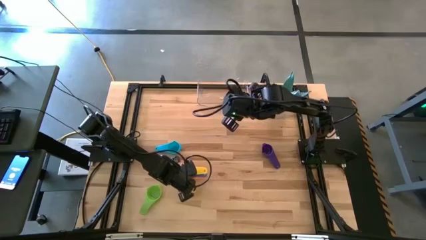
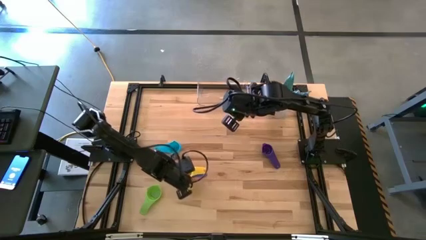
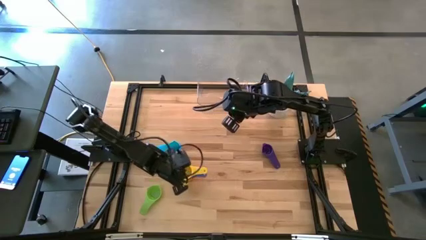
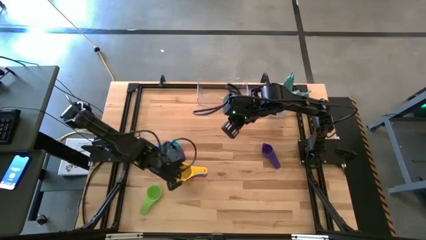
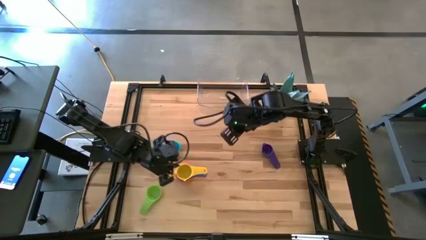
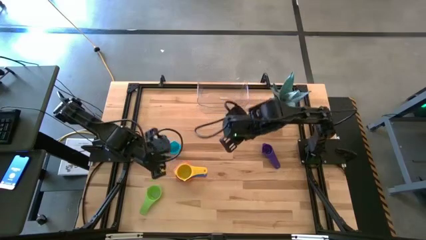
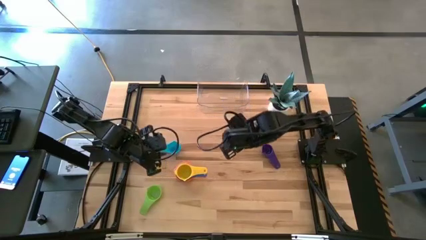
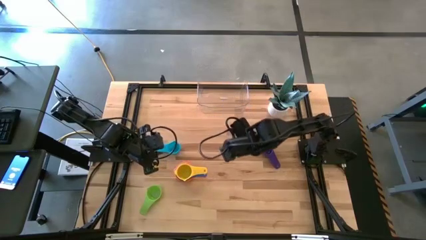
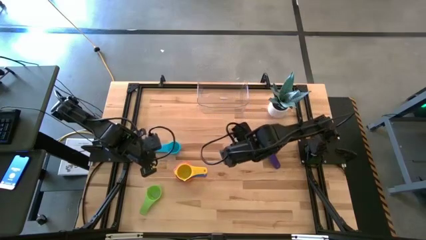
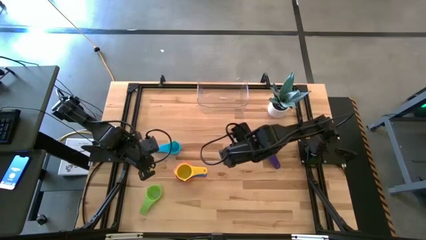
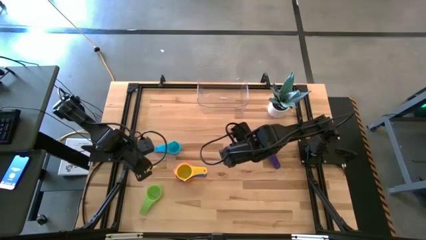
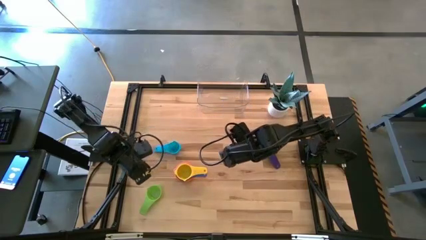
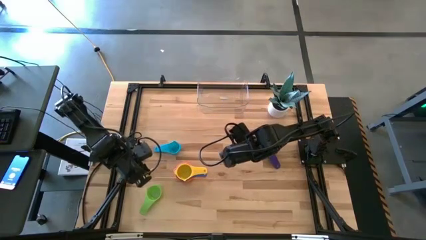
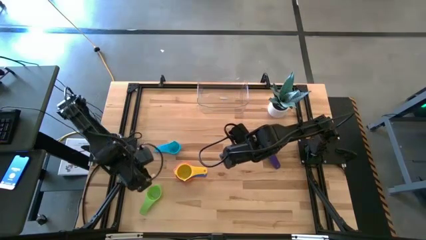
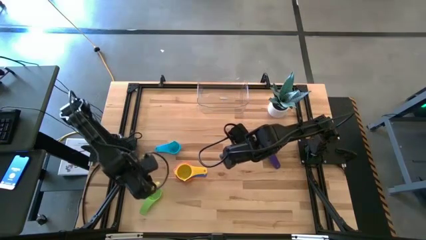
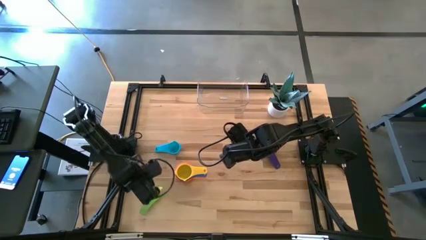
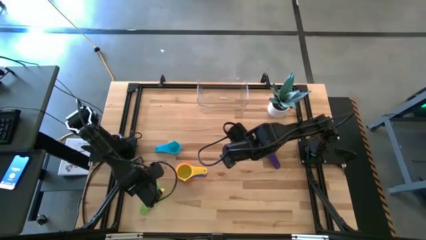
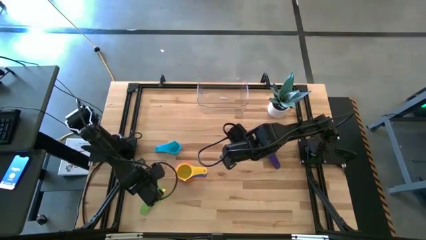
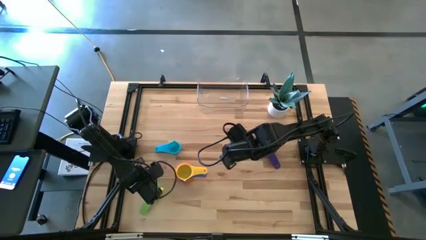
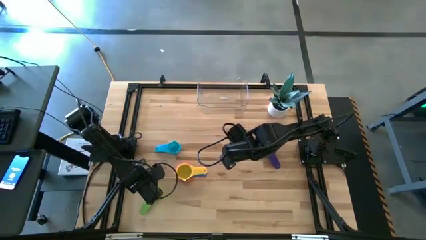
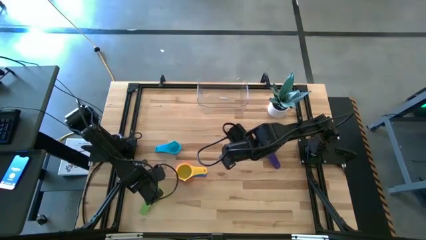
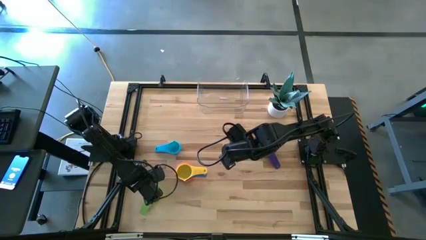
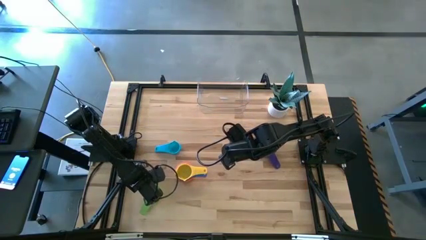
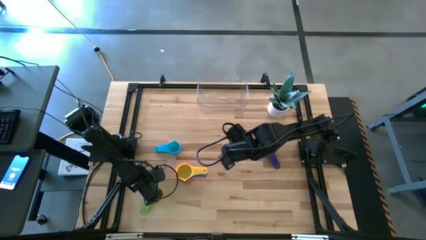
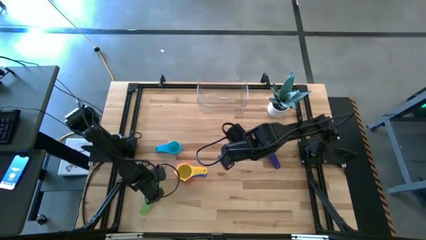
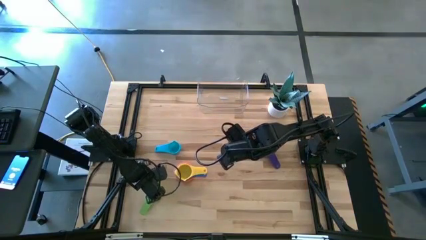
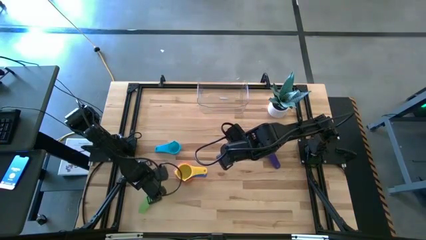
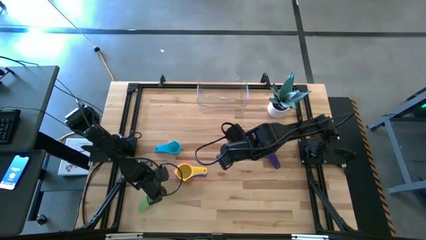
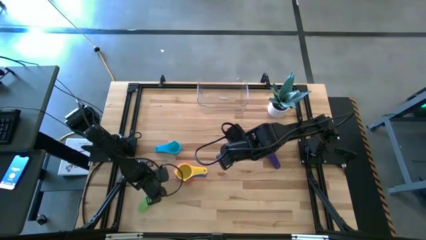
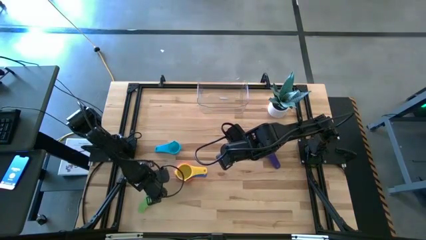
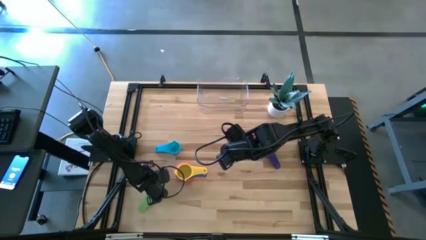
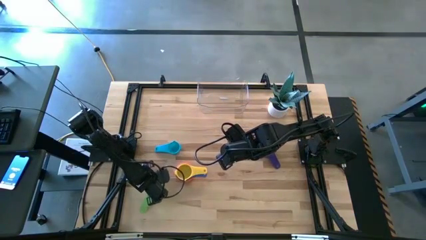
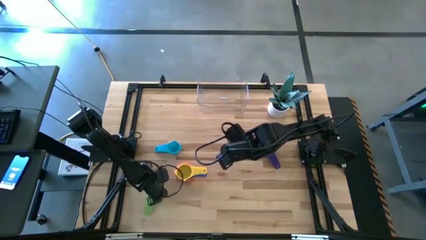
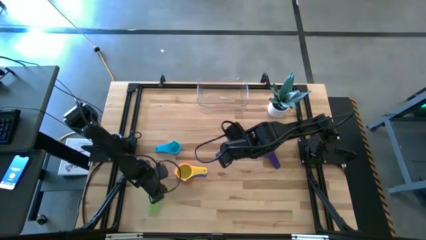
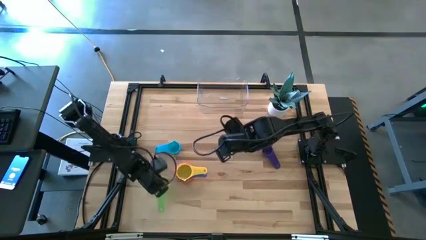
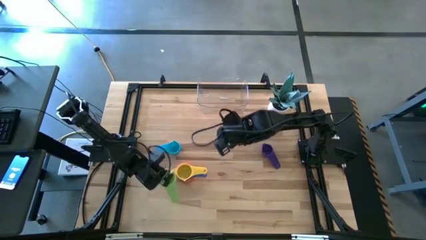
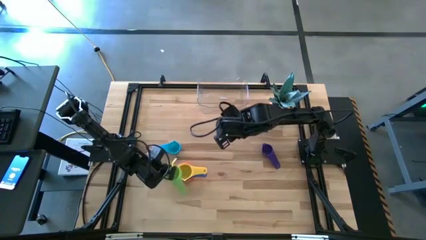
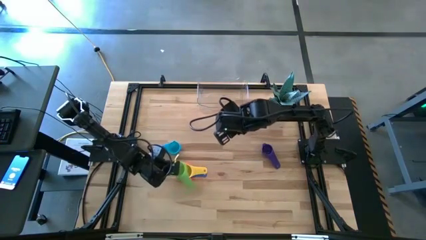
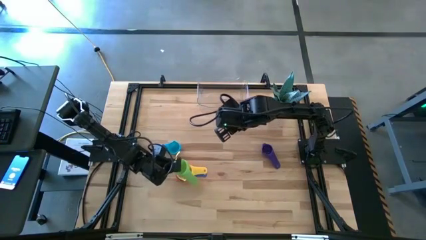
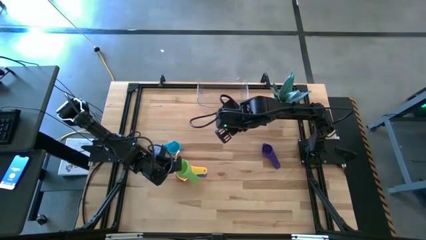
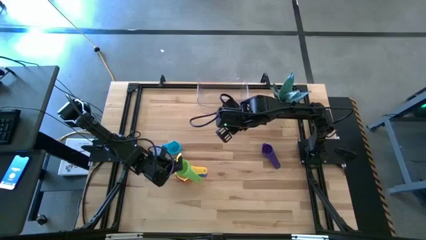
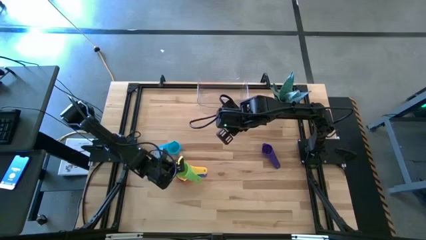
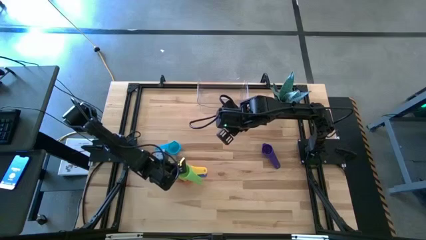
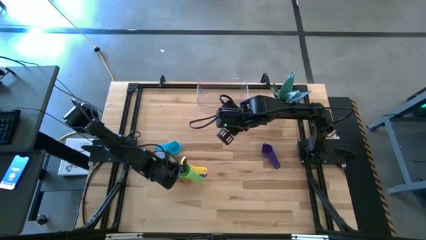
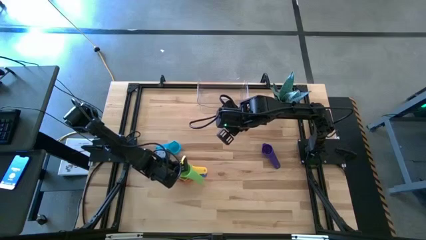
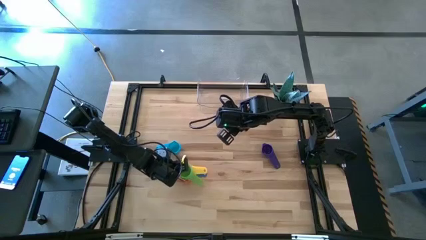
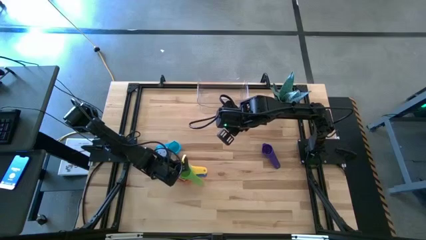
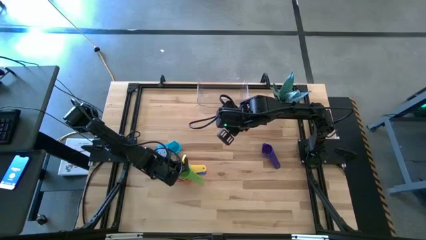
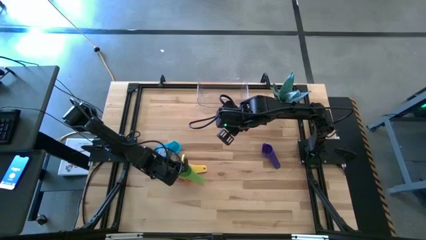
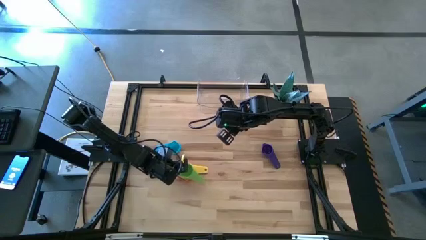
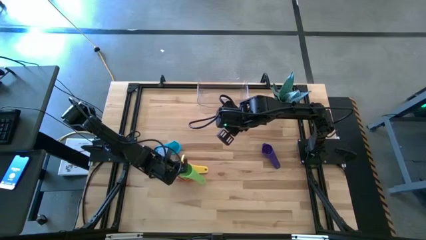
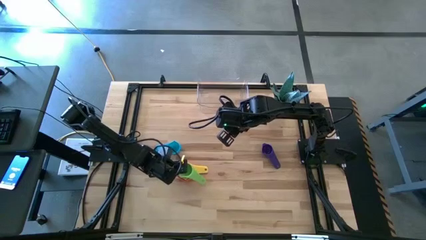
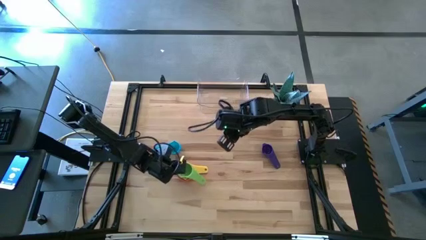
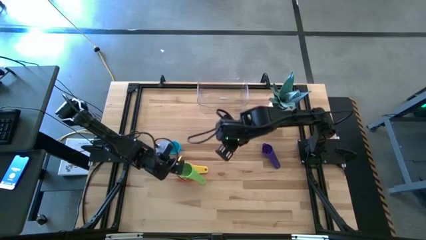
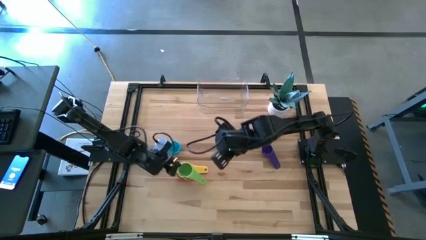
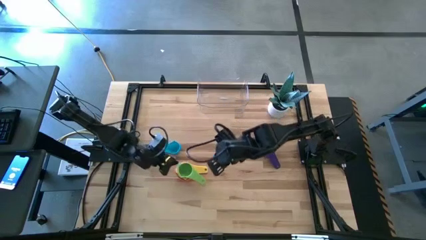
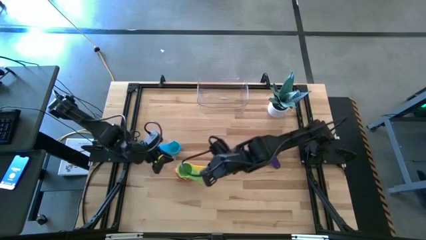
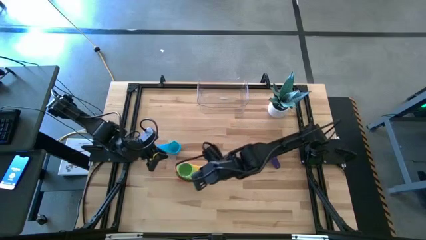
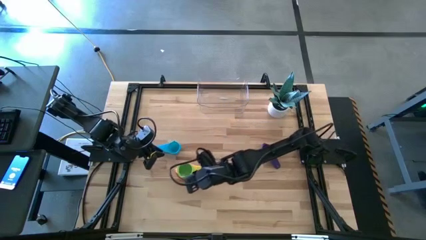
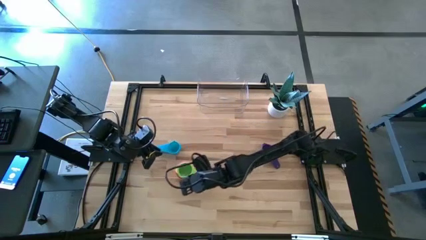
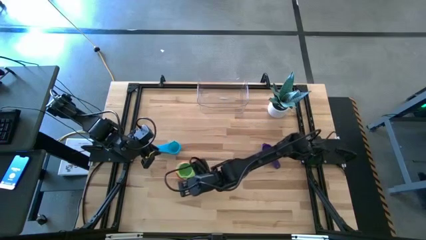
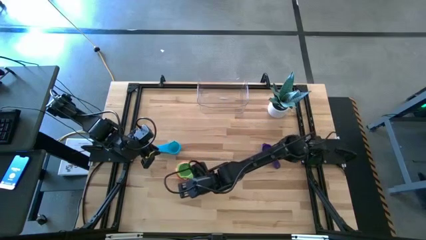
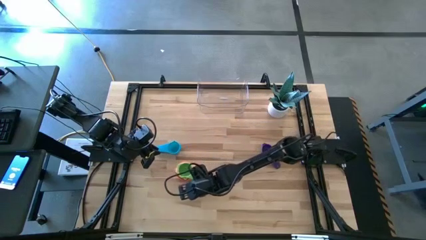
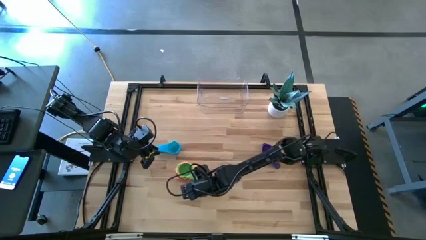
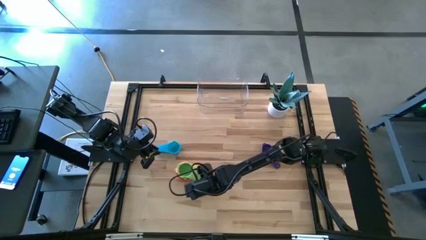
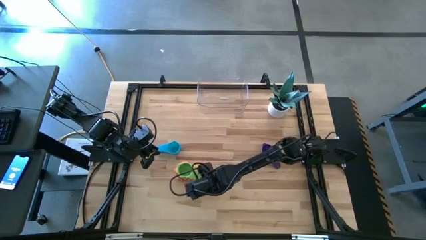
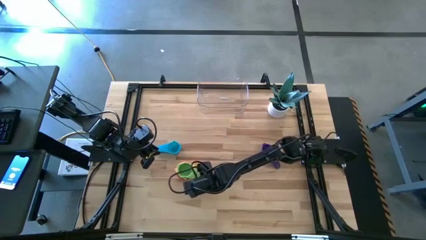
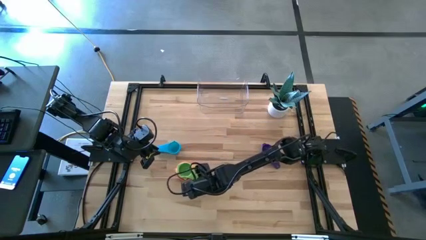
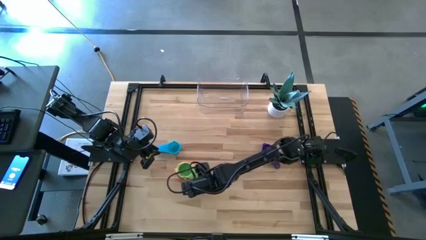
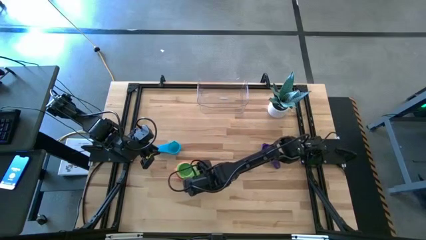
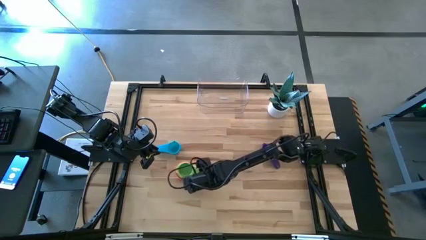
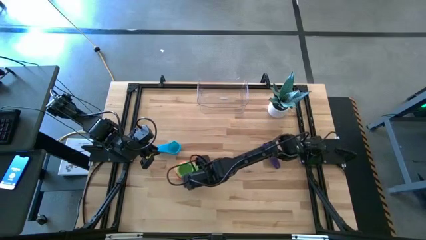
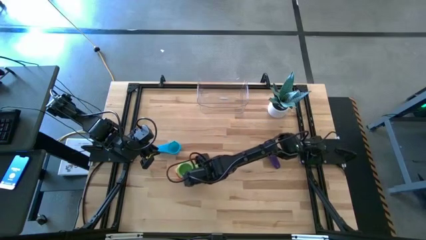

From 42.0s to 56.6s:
Task: Nest measuring cups in basket
Stack the light green measuring cup on top of the yellow measuring cup
